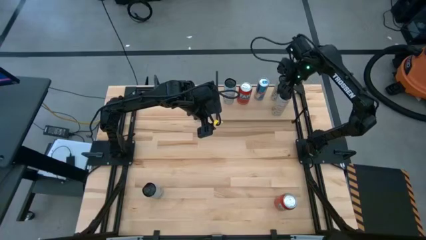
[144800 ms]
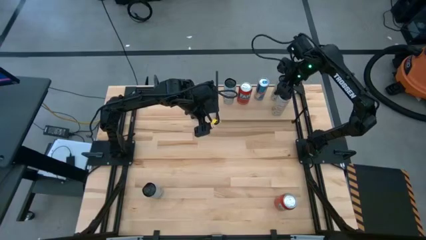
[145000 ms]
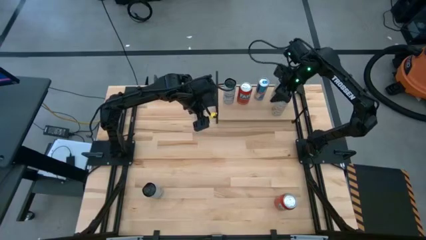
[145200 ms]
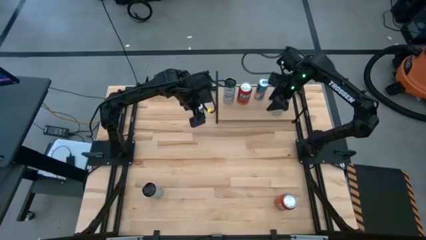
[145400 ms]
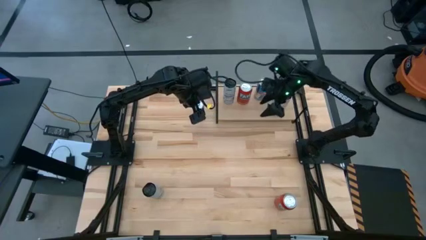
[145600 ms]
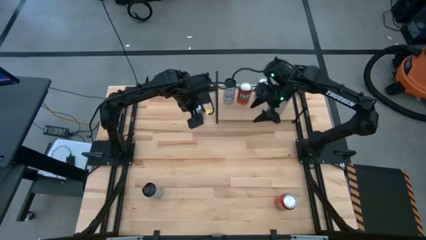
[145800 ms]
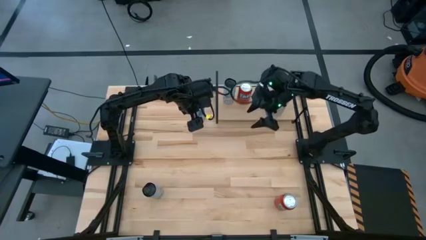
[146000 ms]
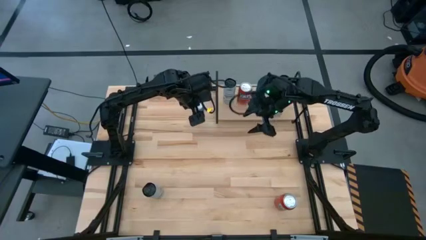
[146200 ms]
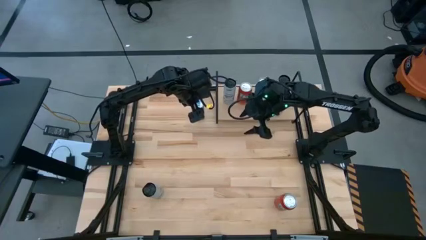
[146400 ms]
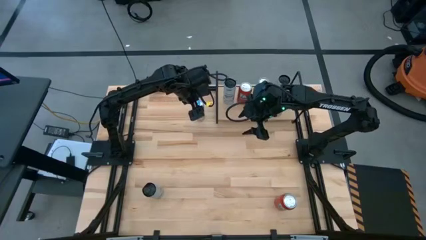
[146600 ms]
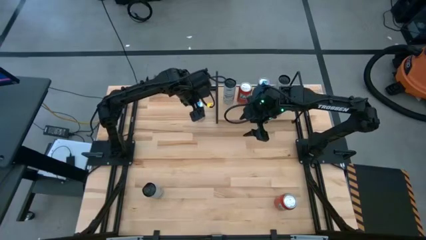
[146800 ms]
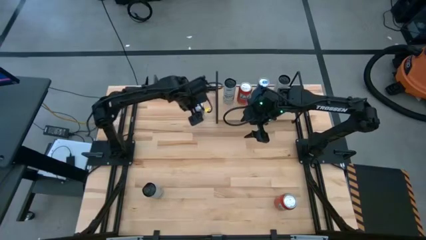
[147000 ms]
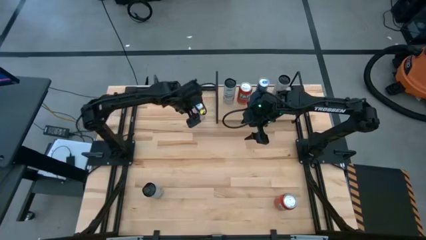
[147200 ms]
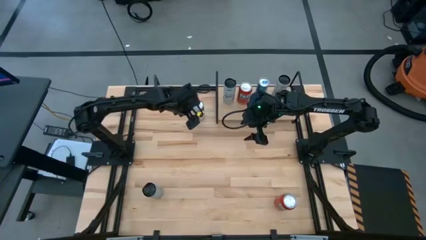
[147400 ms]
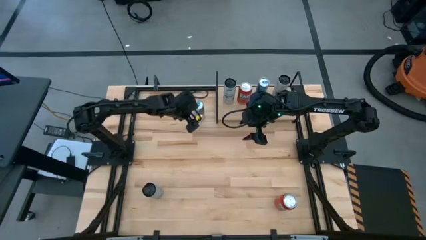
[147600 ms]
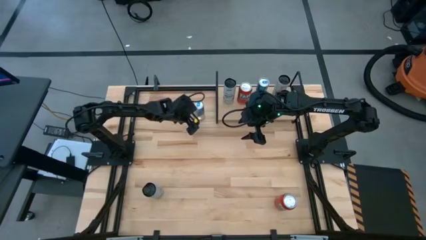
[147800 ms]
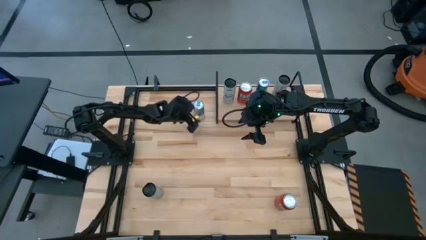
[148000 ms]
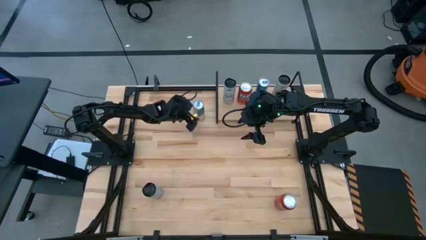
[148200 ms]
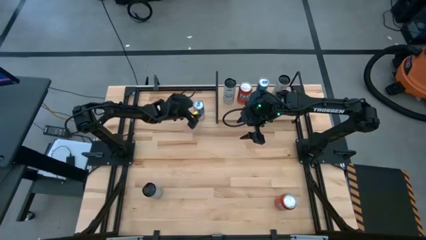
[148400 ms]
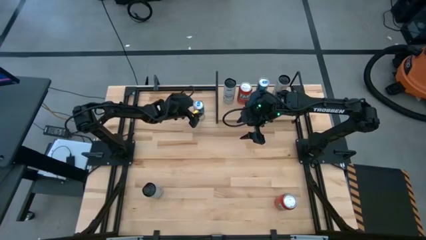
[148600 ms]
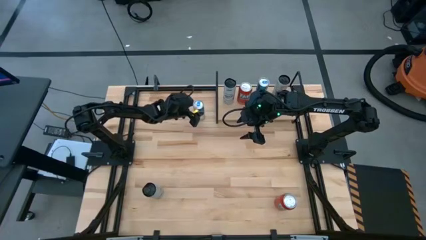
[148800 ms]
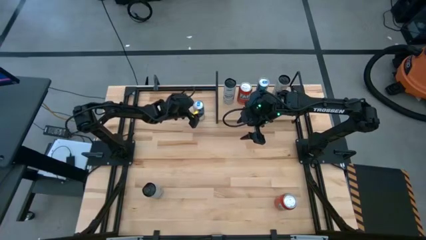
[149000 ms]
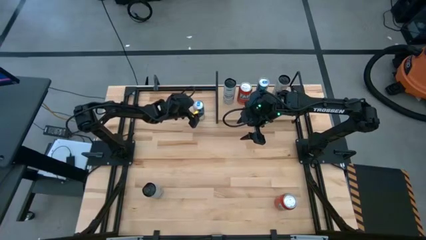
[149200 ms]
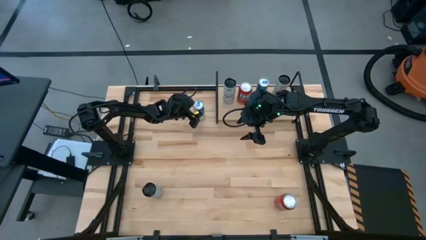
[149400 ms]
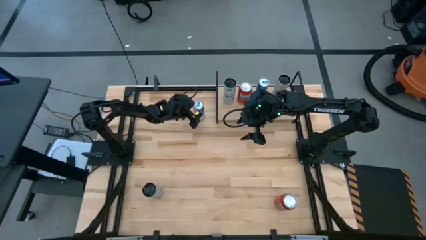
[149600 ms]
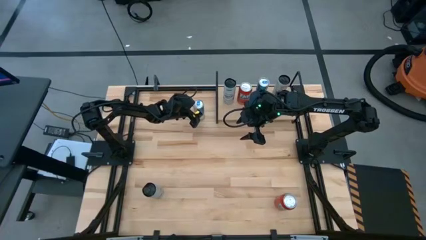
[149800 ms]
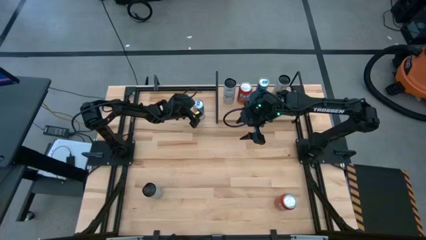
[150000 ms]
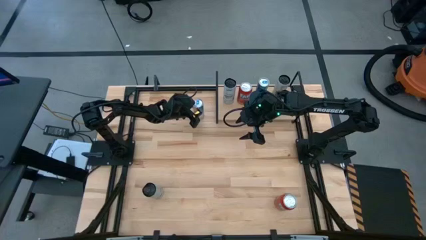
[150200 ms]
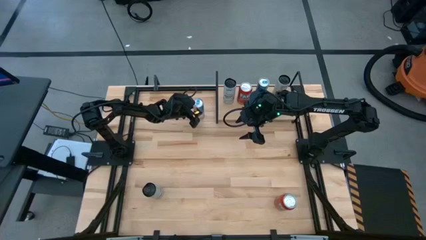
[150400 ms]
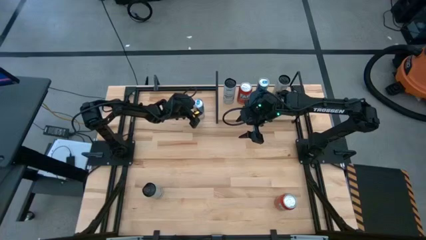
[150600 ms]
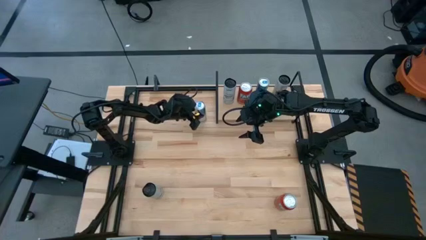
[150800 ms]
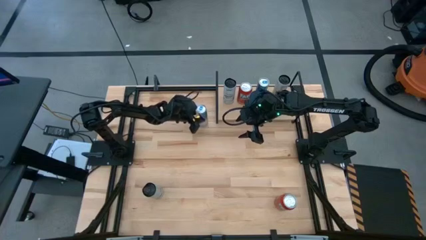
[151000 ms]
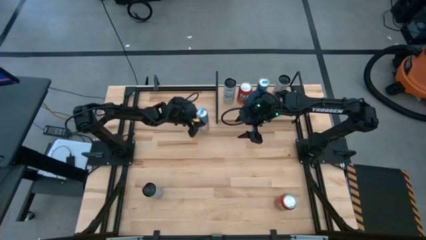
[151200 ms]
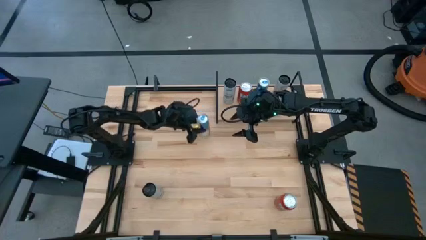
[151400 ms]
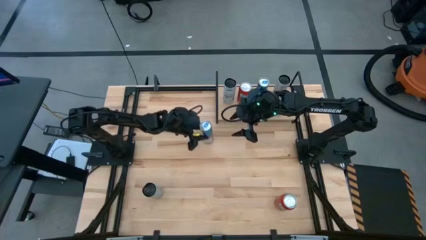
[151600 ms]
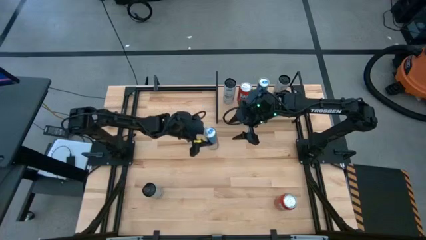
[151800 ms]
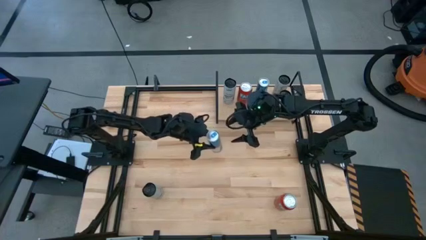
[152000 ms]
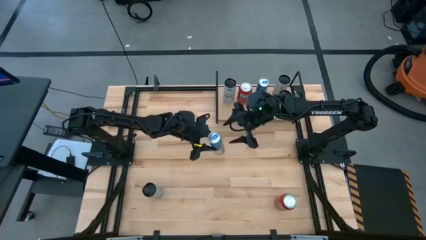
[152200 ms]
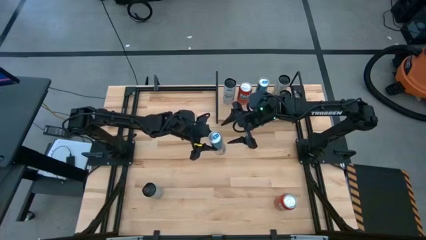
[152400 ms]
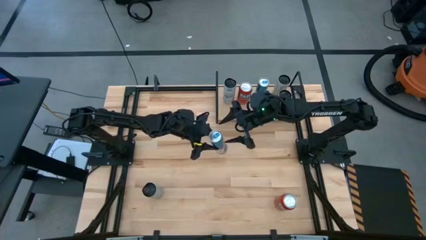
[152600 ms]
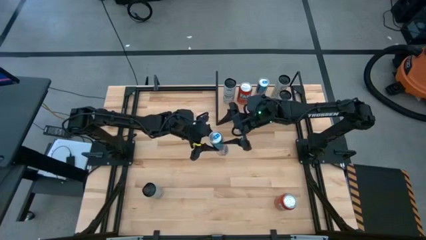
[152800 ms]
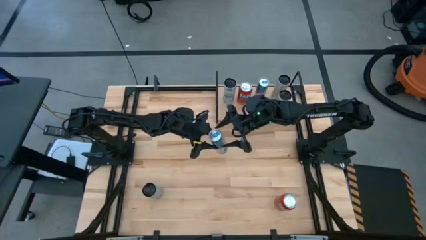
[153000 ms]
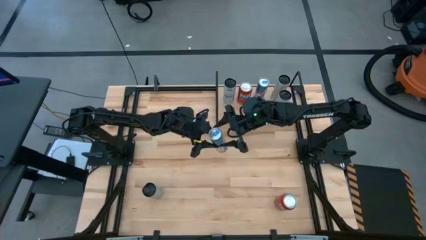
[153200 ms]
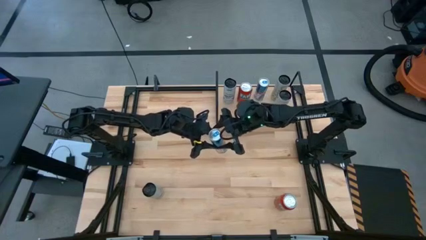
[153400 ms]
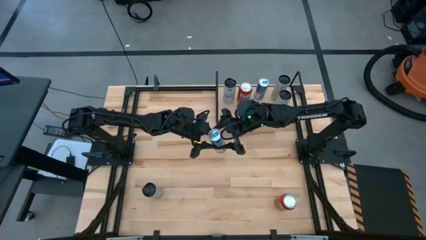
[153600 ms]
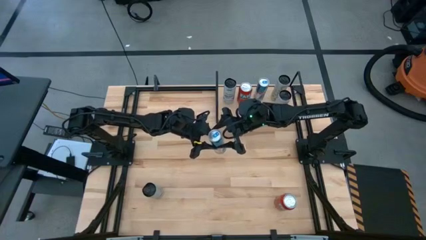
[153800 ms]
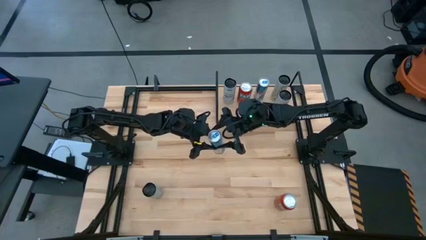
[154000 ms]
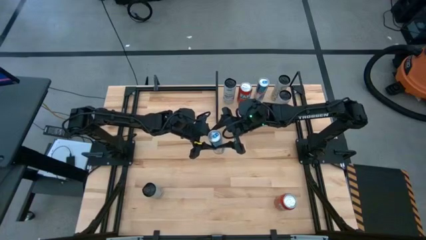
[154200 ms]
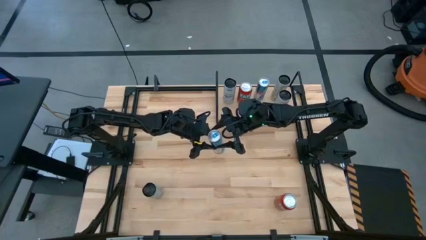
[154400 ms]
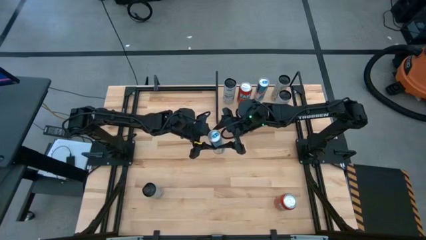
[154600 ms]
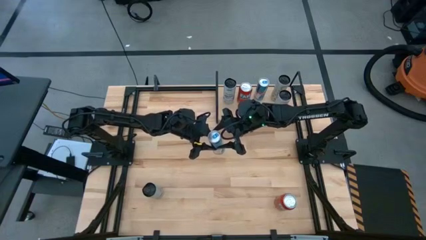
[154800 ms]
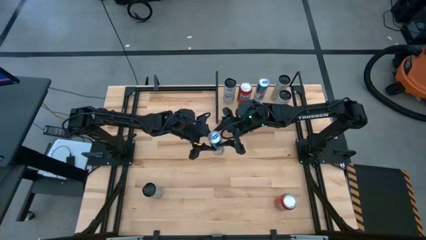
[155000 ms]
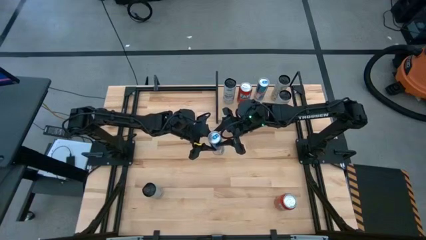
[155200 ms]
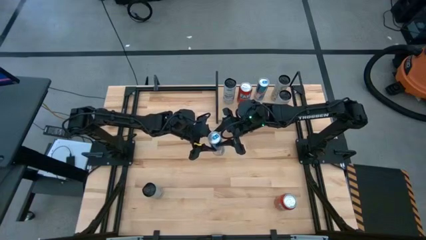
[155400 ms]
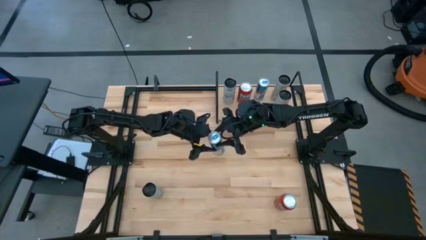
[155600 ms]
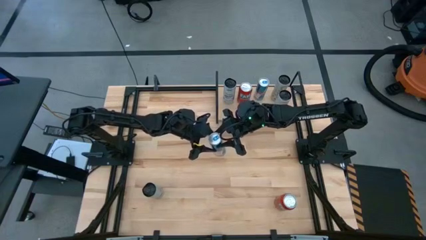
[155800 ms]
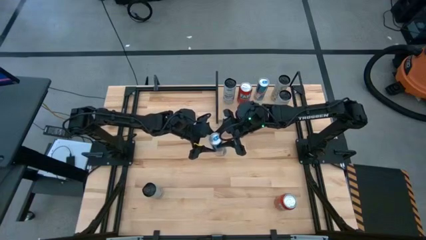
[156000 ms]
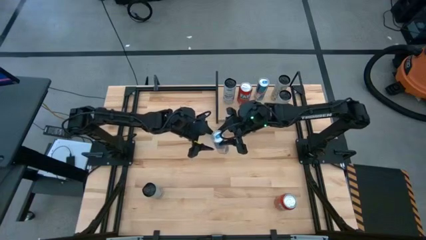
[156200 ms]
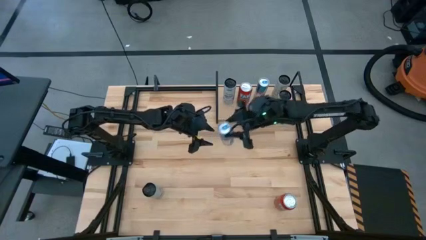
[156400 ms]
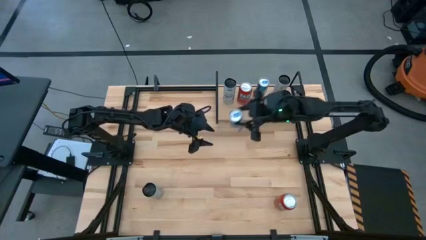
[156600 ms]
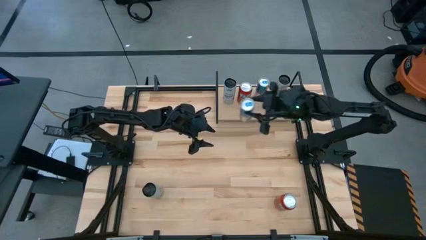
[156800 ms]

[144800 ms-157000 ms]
Task: Place canned beverage on shelf
Put the blue soda can on the shelf aligned with the other blue soda can

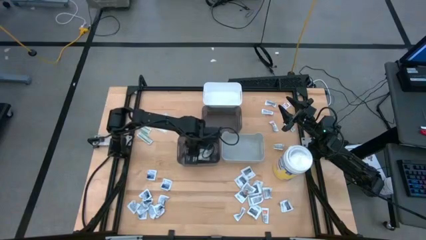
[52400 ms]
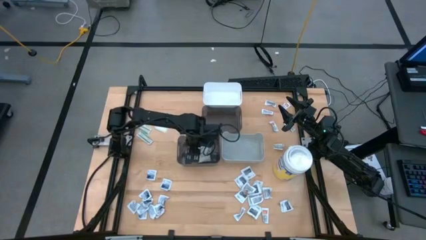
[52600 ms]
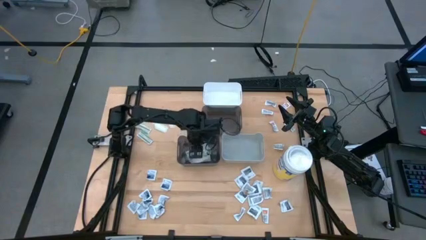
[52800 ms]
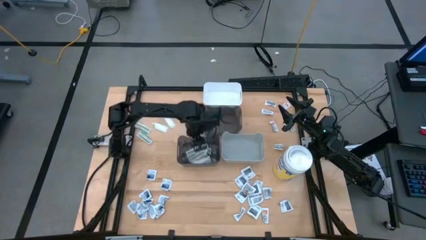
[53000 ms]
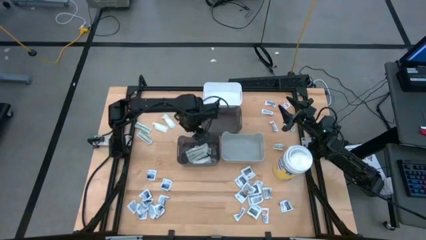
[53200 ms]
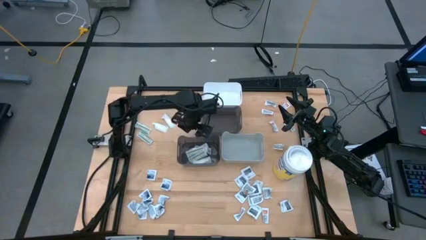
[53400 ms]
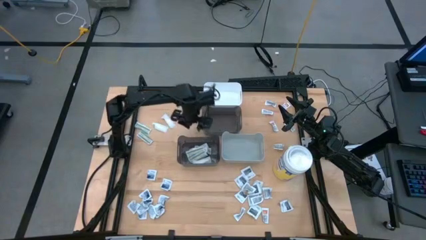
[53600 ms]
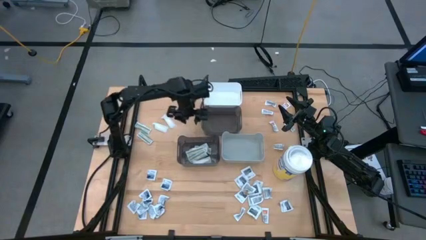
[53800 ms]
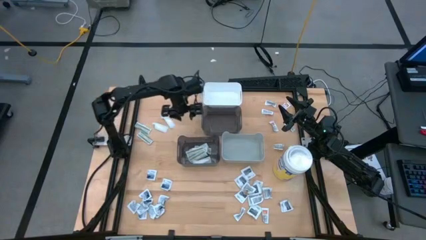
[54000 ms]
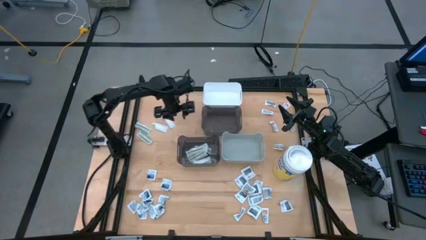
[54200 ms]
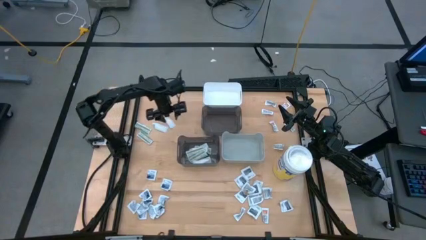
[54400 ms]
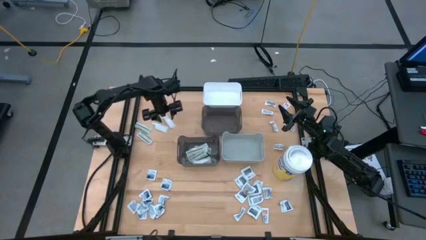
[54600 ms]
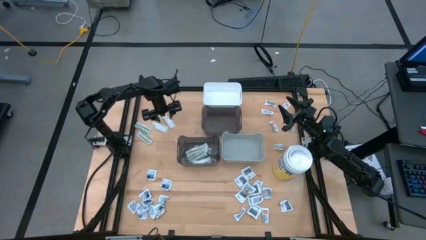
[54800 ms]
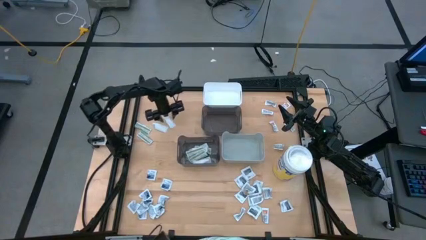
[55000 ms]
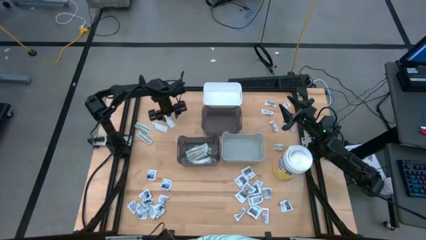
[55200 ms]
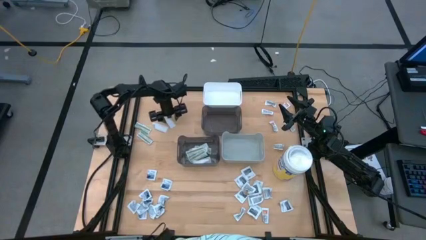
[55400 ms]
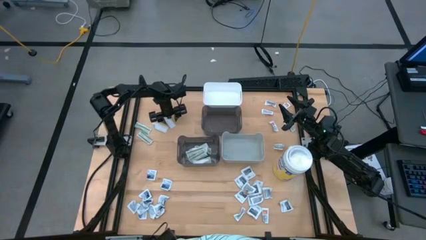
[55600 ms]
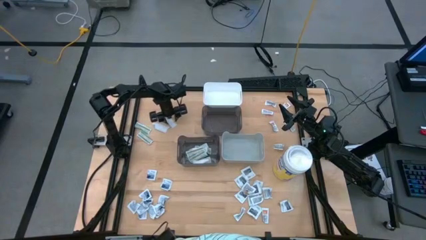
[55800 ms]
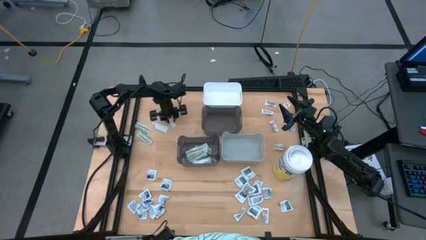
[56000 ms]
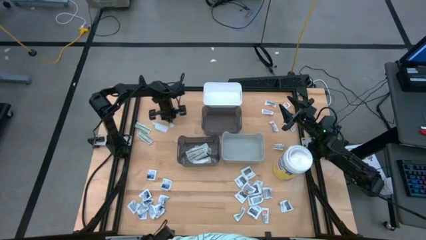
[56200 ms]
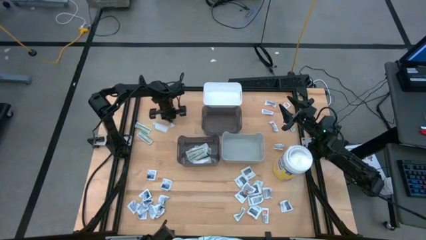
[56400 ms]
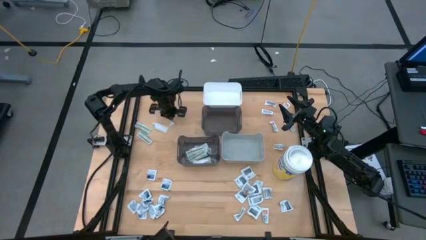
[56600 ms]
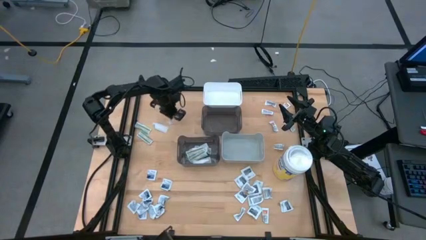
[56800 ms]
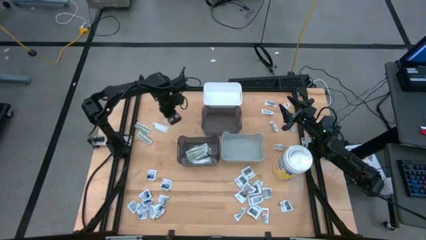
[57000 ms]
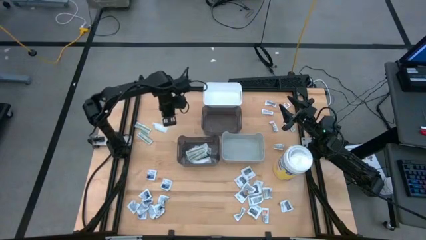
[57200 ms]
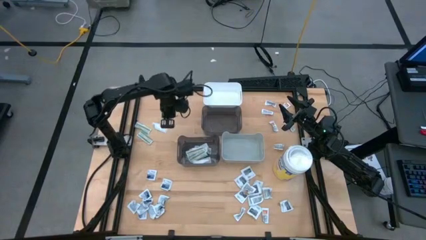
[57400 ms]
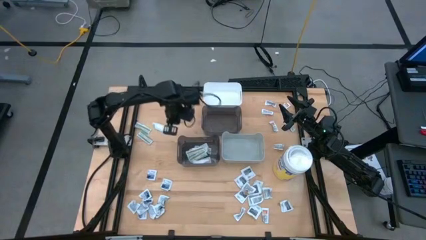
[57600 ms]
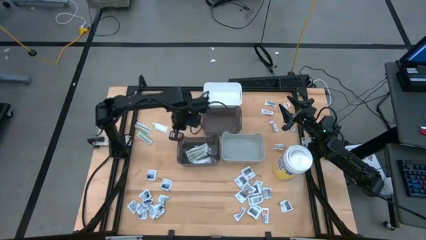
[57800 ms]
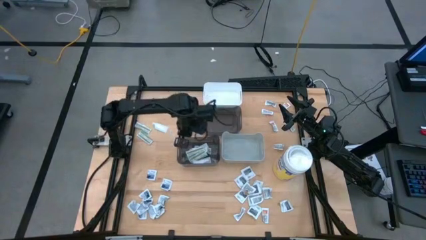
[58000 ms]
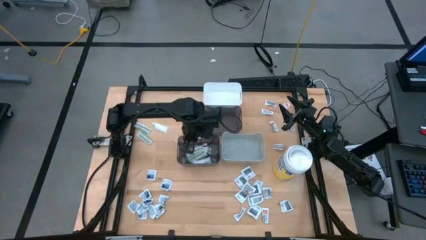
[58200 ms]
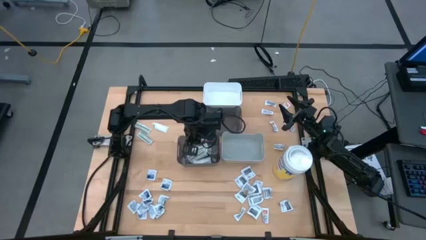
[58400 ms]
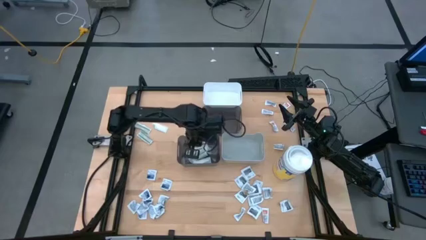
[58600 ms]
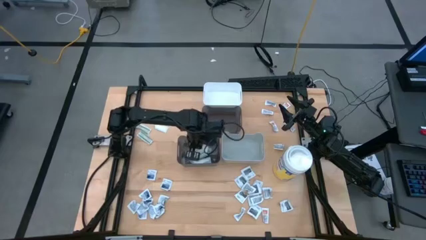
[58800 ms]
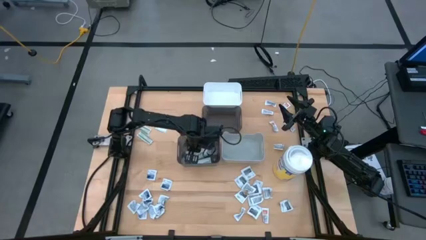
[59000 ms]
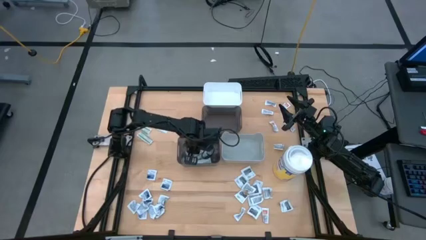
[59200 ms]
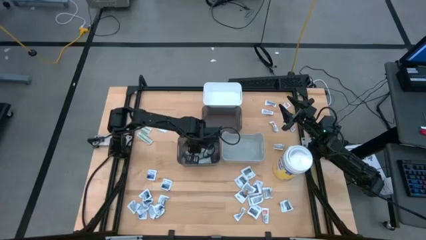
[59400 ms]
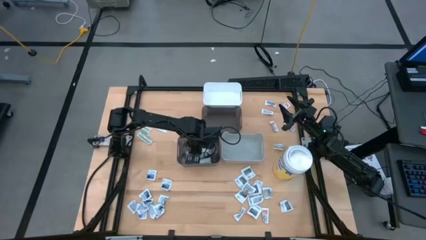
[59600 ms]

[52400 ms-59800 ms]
Task: Pick & Place First Aid Supplies
Put the white bandage into the bottom black bin
